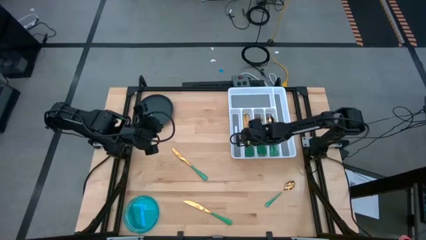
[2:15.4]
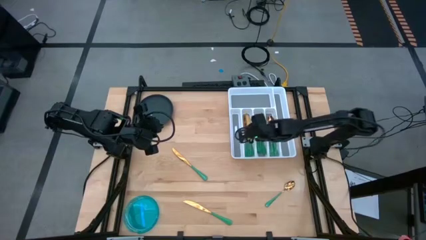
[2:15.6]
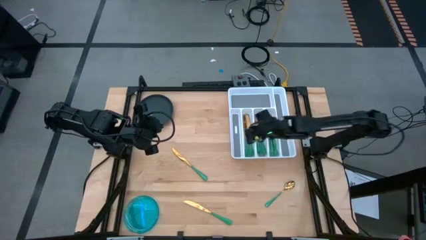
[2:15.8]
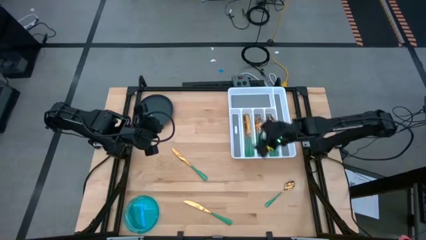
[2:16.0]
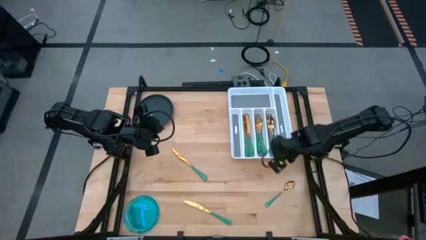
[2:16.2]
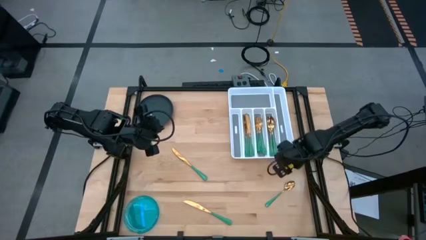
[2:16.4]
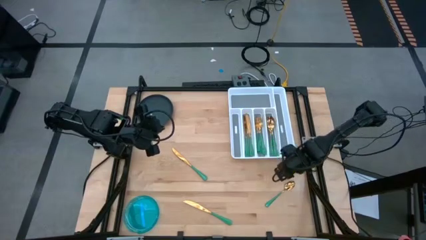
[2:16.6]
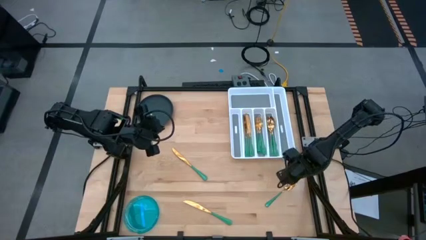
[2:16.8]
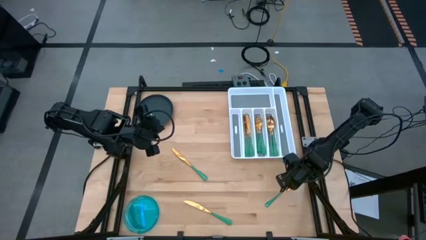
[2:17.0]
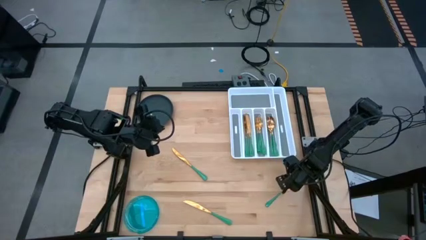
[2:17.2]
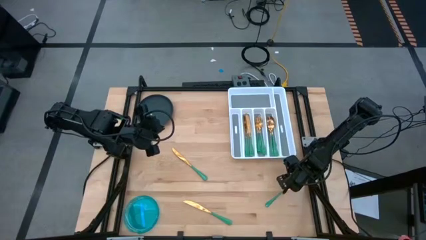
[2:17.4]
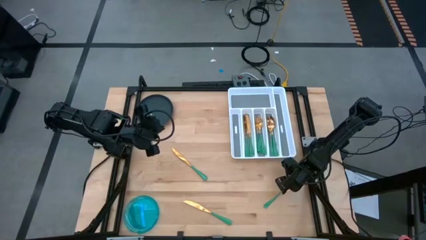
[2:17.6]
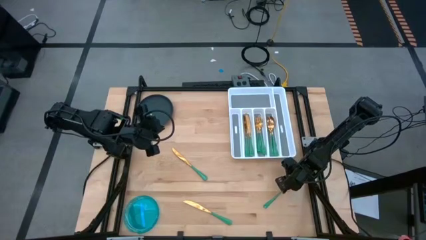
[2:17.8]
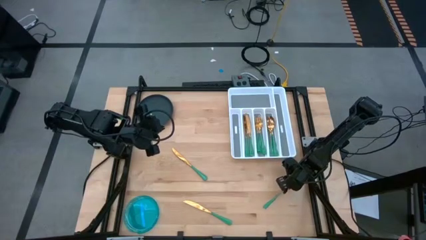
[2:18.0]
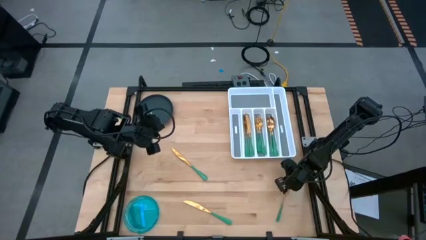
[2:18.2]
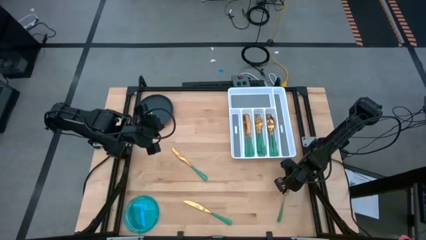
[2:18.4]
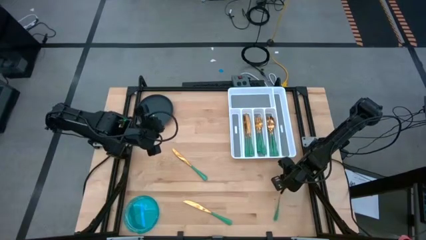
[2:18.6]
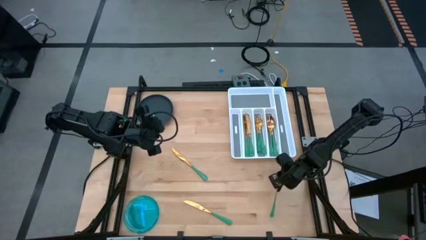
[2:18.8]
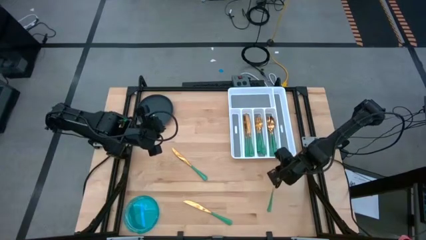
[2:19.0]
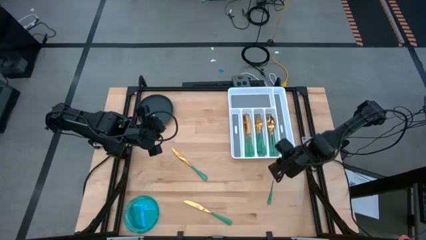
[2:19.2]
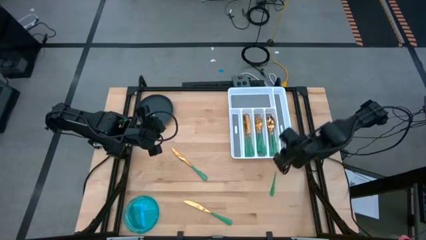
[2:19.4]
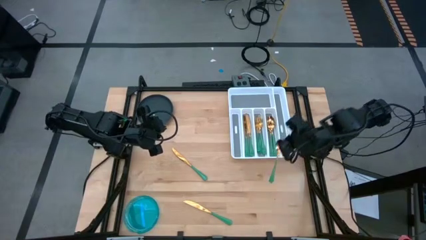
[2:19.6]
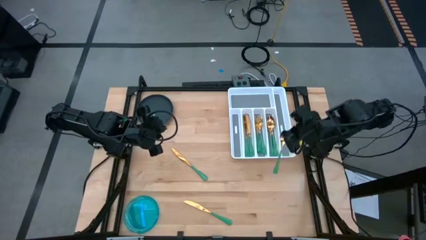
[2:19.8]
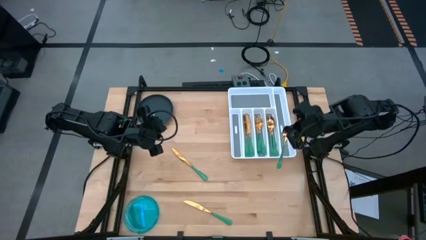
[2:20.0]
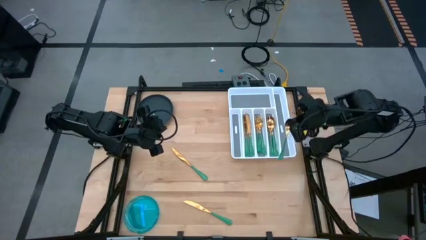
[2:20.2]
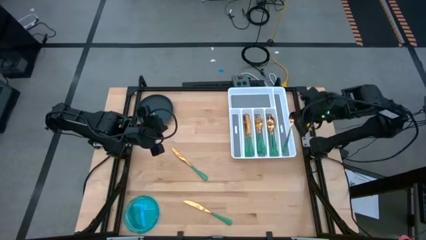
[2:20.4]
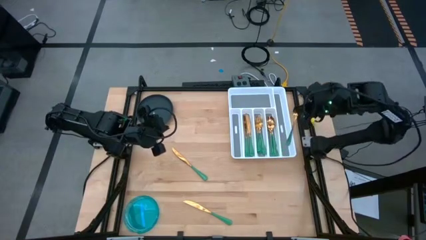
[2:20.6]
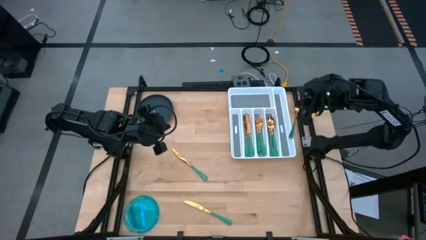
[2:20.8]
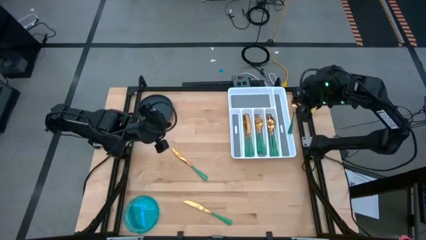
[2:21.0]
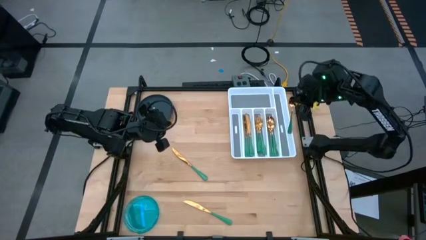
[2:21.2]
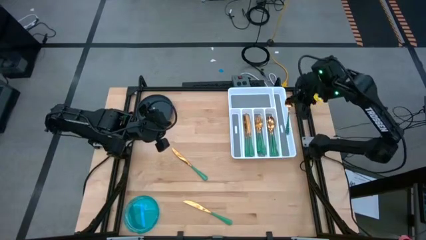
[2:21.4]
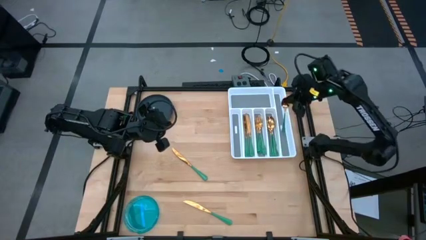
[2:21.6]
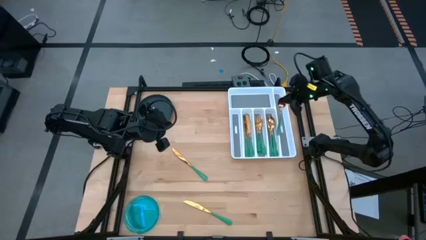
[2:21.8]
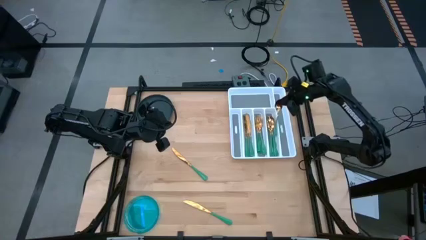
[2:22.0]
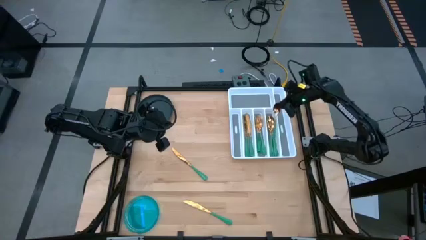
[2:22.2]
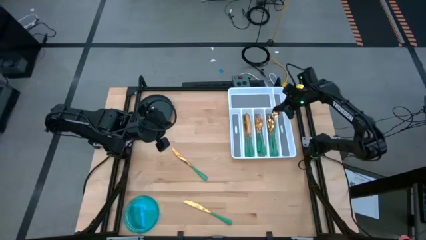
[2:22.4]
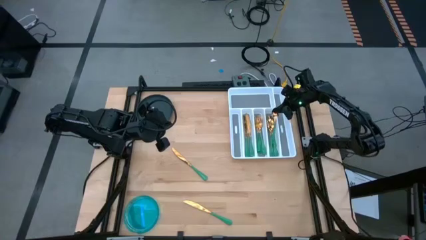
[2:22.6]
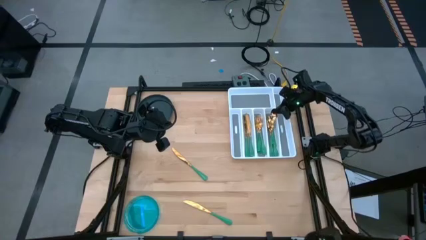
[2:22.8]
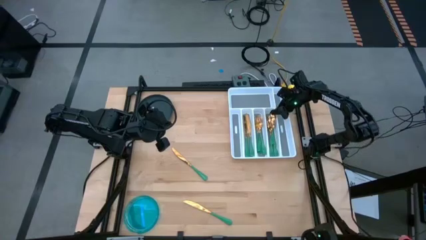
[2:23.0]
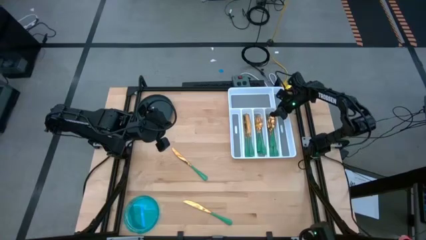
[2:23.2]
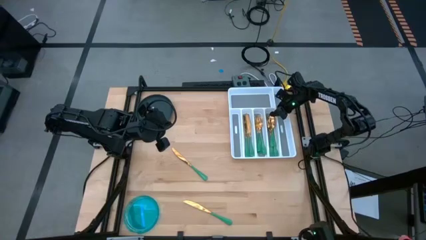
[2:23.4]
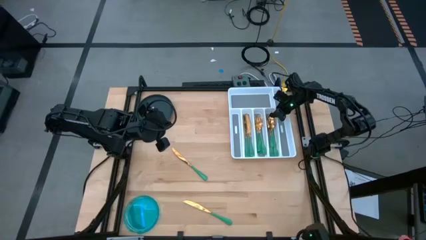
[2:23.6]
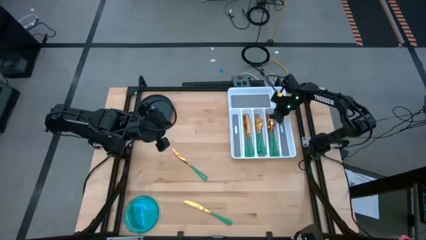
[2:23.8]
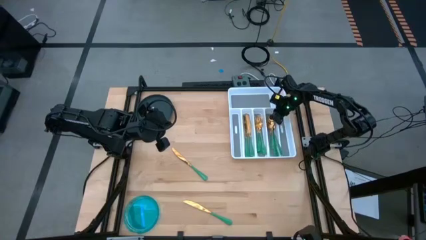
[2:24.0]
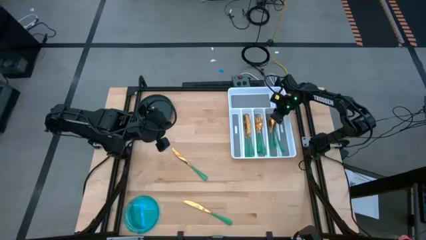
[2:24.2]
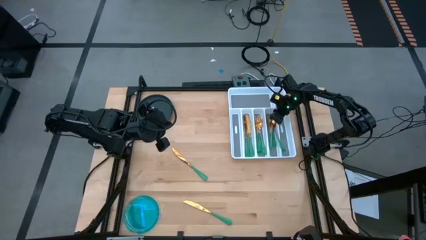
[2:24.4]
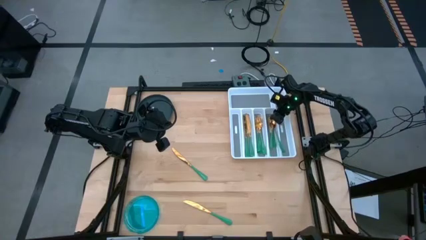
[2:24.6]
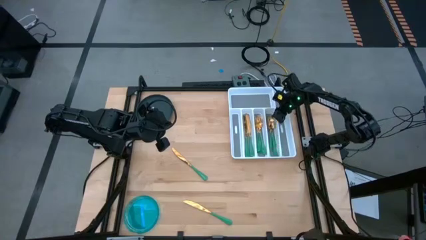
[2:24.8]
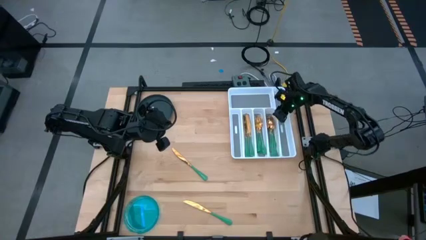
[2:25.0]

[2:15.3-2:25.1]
Task: Sort silverware
Put the green spoon into the white silverware organizer

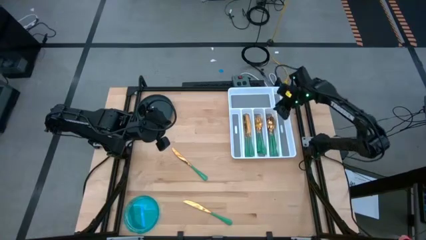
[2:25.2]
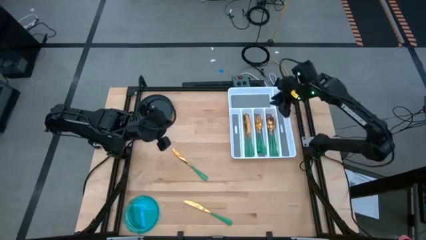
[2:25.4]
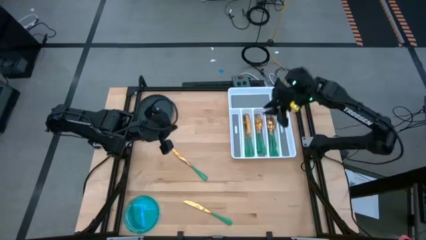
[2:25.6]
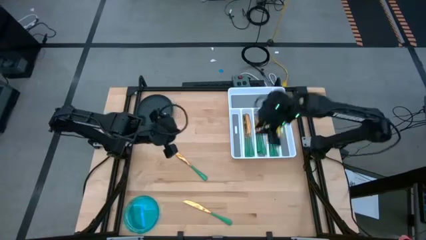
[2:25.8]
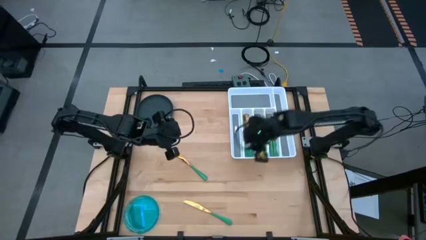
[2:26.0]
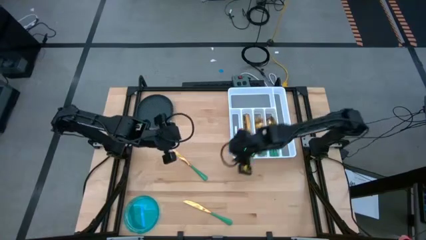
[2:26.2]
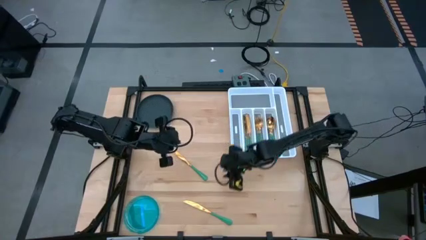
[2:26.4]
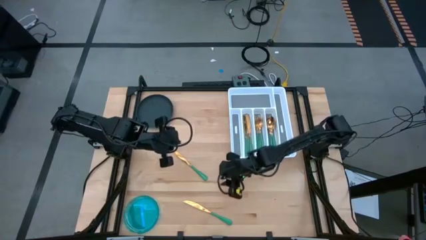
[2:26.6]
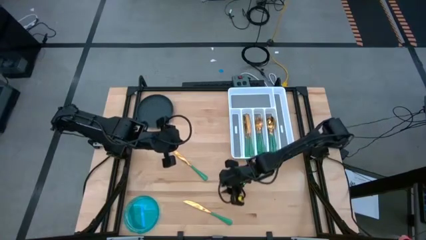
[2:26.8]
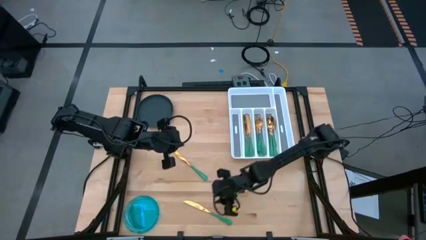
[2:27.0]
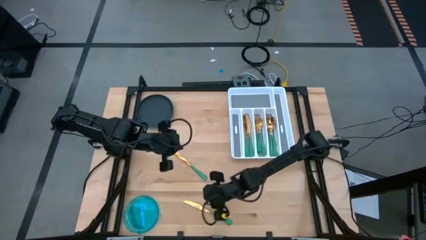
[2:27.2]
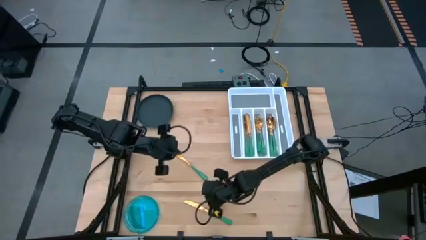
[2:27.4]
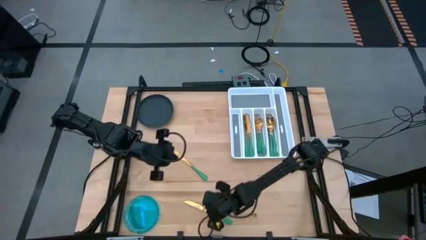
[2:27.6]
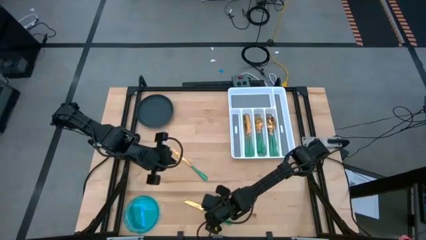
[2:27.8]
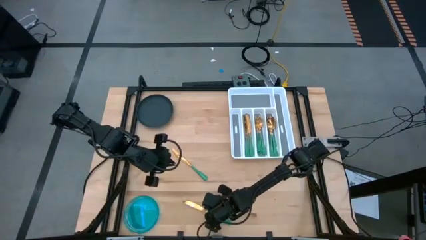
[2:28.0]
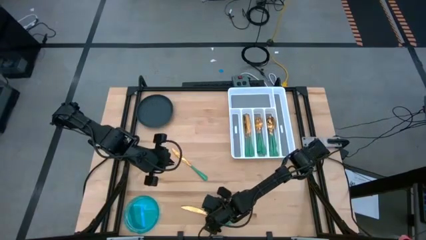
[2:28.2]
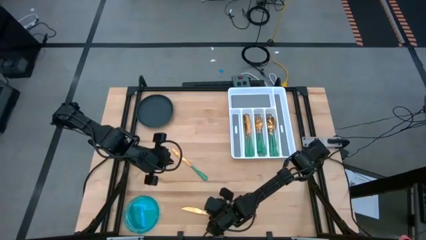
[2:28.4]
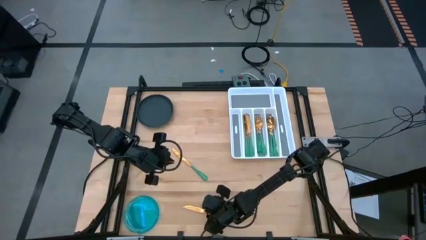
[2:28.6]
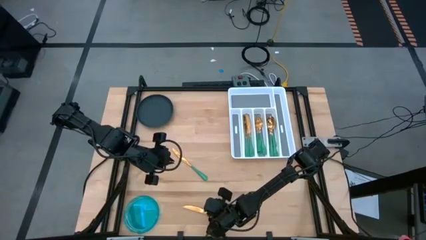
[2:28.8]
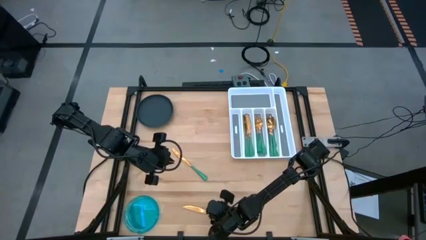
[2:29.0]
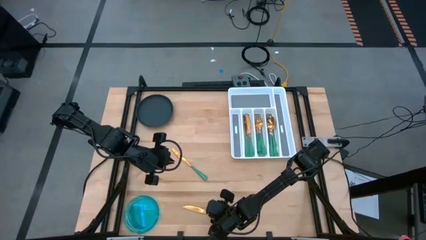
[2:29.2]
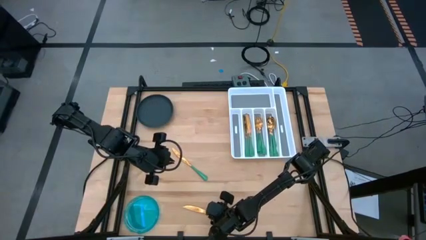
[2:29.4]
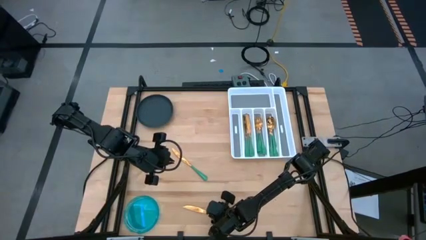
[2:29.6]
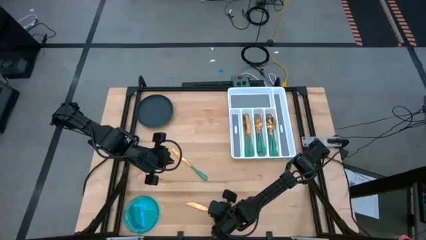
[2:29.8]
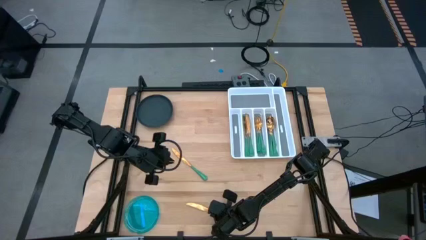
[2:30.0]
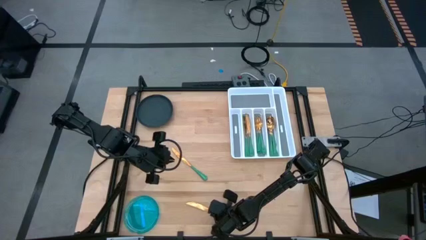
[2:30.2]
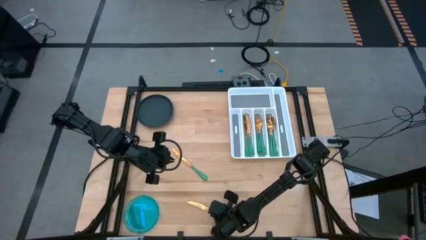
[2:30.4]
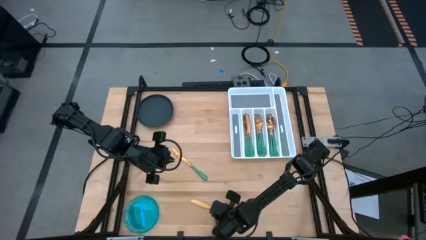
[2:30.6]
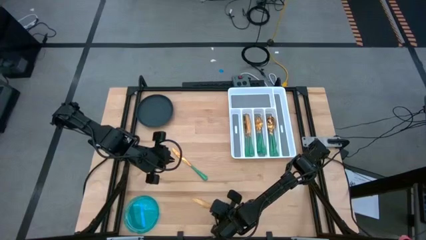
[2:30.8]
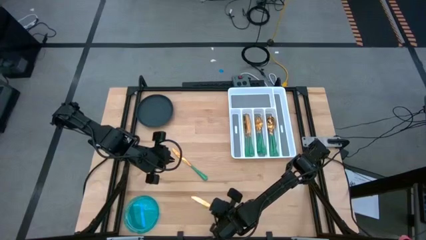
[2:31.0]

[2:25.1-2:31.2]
Put the green knife into the white silverware organizer
